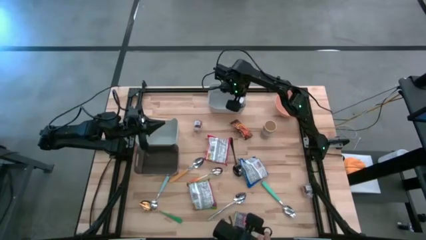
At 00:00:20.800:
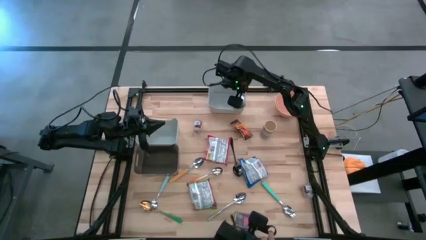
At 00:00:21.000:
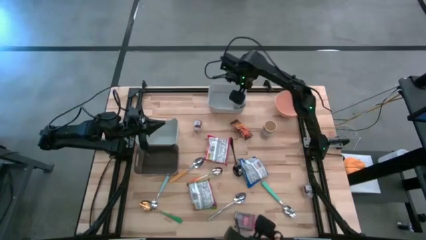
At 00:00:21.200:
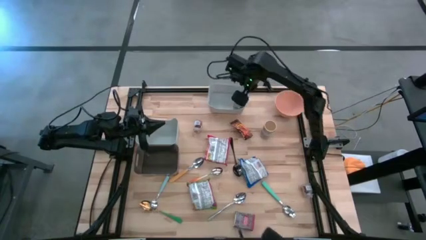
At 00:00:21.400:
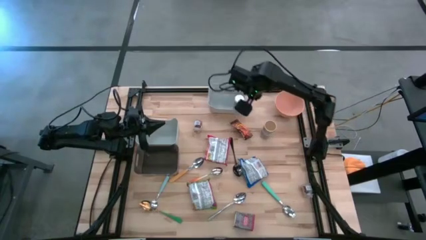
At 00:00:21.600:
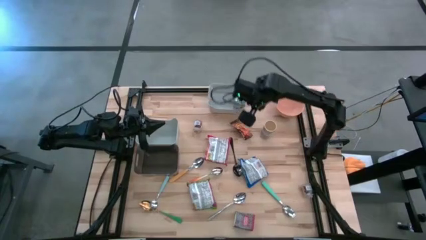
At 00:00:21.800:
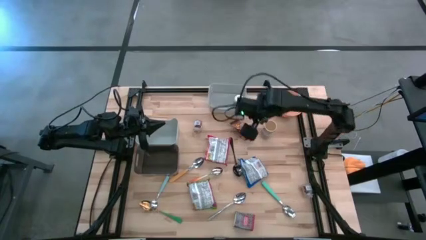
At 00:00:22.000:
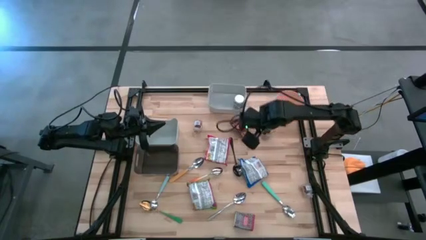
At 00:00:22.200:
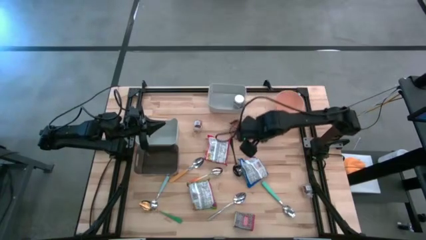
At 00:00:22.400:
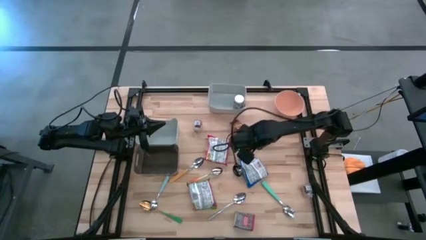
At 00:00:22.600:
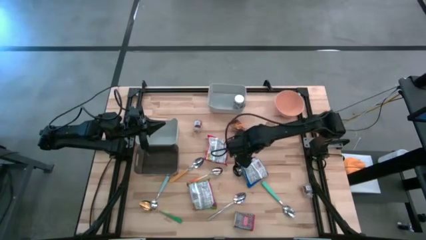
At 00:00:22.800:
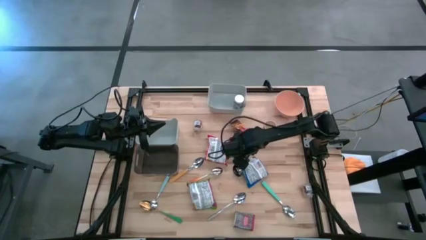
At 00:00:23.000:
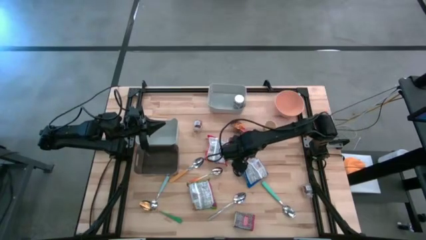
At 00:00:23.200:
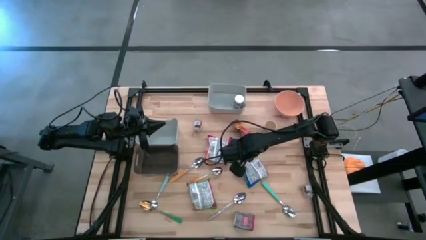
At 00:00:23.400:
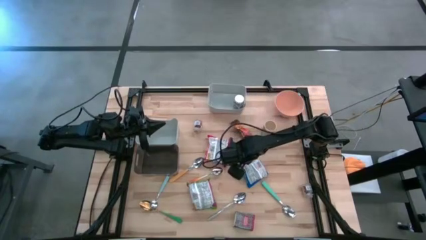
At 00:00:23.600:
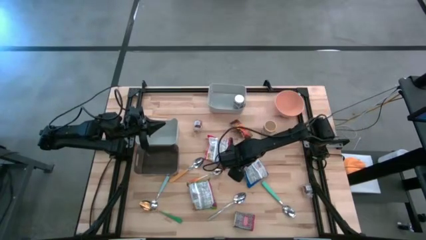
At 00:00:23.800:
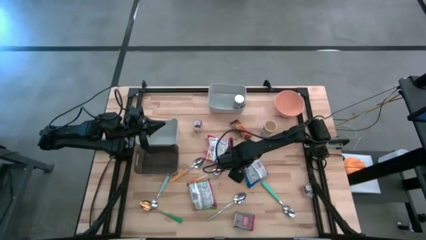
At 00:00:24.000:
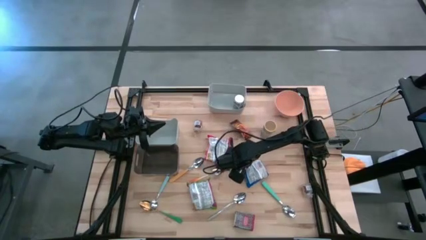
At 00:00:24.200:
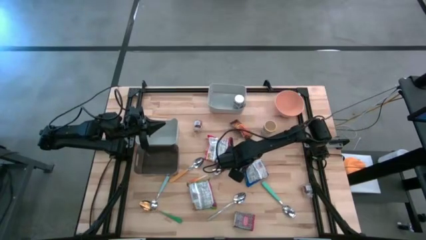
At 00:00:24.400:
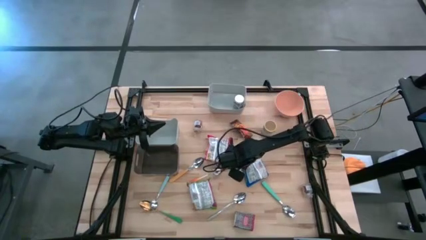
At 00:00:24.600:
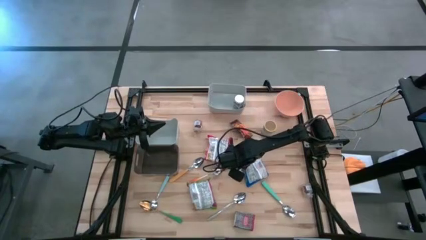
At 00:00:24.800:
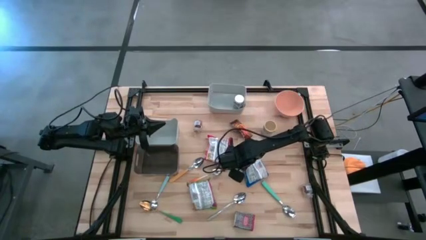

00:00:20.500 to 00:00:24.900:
Put the blue noodle pack into the bottom gray bin

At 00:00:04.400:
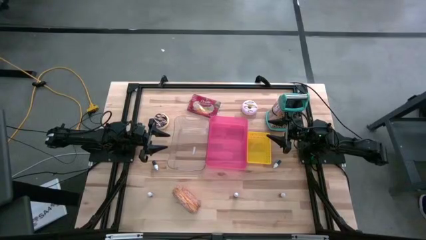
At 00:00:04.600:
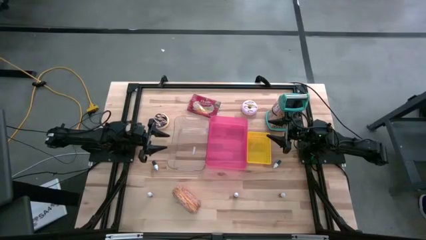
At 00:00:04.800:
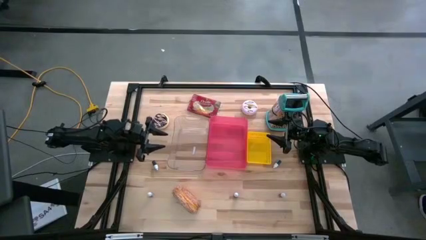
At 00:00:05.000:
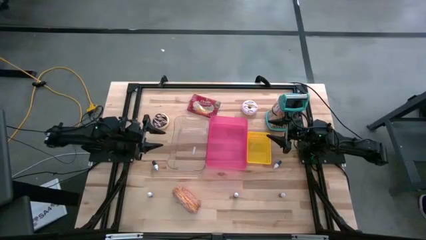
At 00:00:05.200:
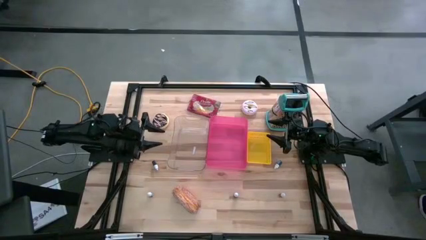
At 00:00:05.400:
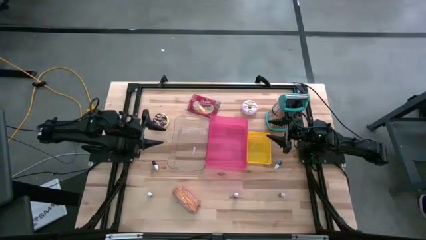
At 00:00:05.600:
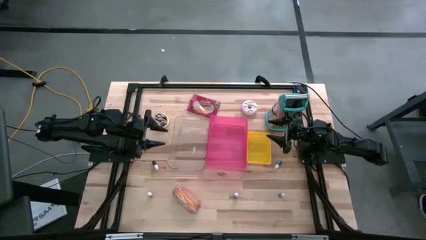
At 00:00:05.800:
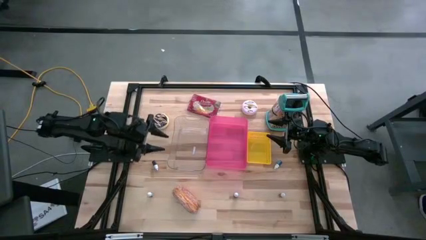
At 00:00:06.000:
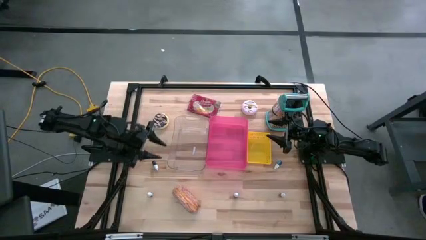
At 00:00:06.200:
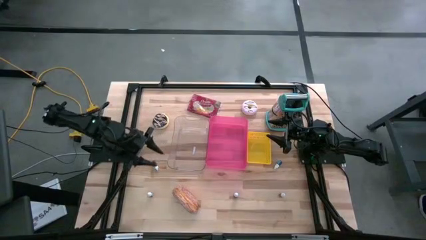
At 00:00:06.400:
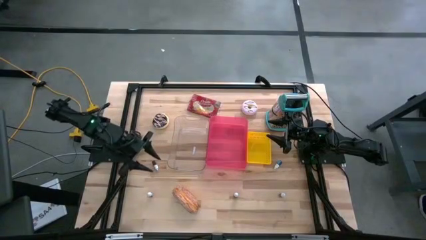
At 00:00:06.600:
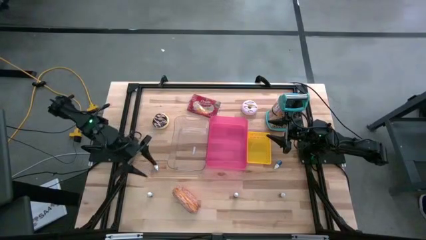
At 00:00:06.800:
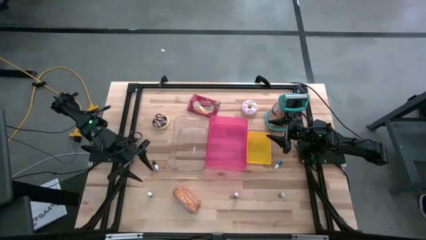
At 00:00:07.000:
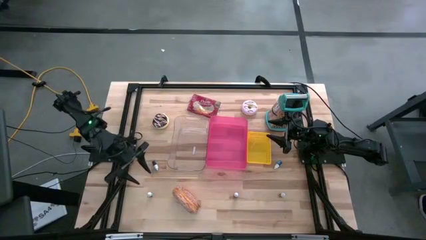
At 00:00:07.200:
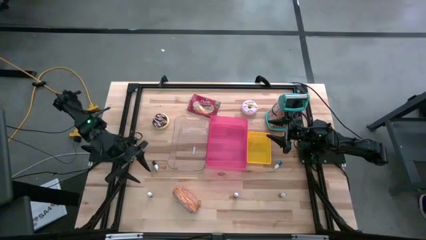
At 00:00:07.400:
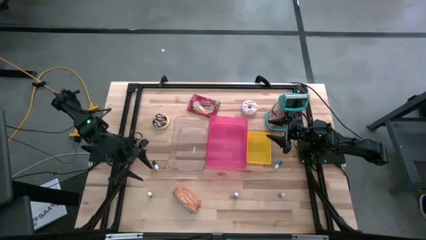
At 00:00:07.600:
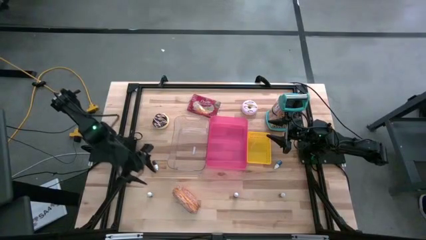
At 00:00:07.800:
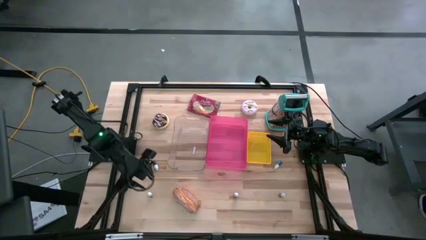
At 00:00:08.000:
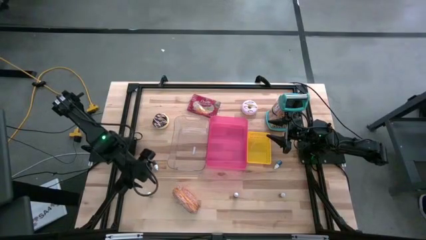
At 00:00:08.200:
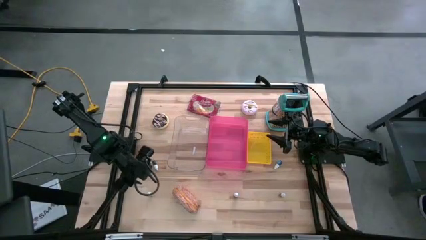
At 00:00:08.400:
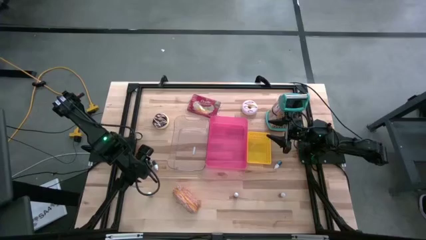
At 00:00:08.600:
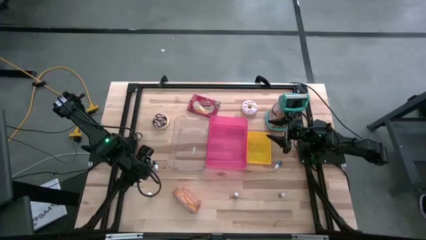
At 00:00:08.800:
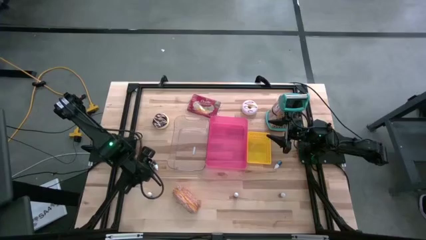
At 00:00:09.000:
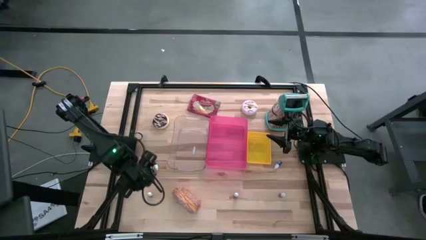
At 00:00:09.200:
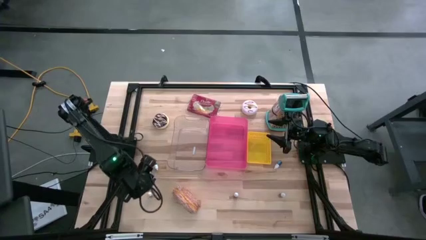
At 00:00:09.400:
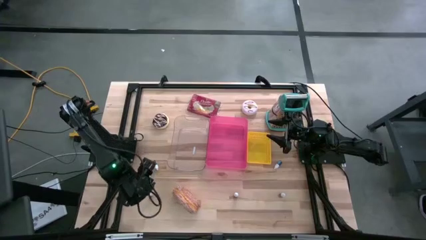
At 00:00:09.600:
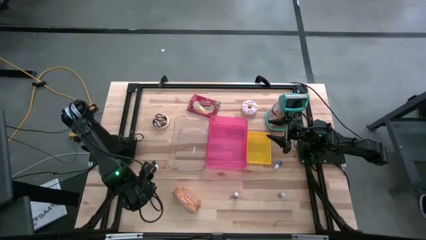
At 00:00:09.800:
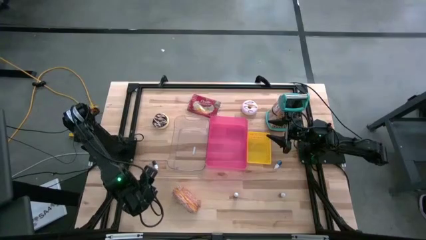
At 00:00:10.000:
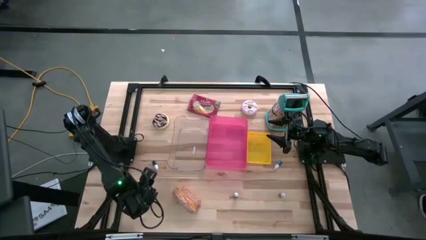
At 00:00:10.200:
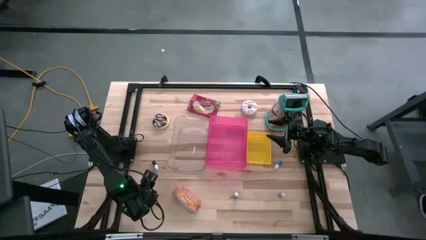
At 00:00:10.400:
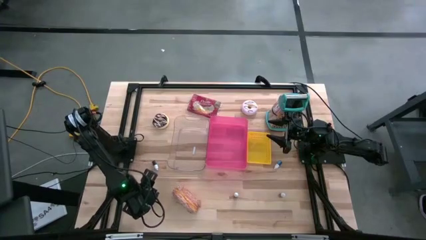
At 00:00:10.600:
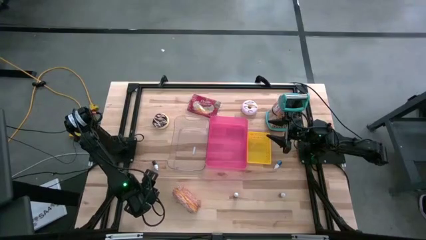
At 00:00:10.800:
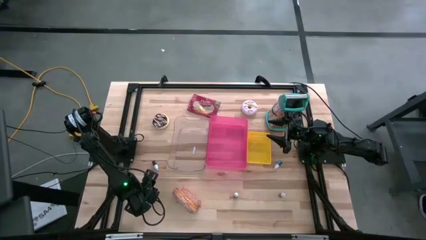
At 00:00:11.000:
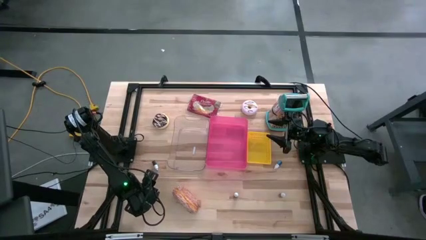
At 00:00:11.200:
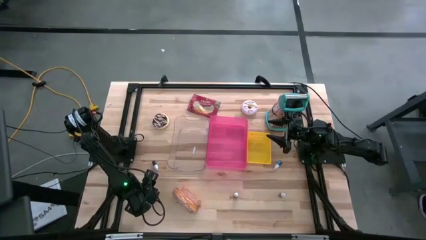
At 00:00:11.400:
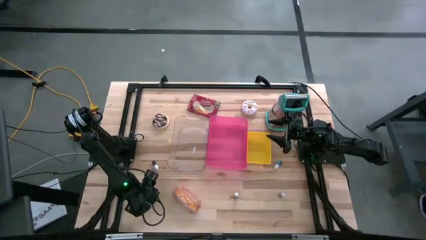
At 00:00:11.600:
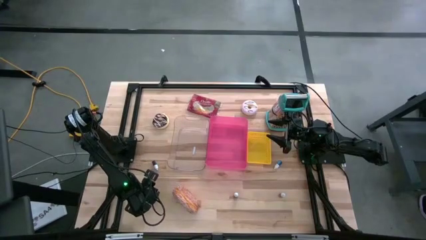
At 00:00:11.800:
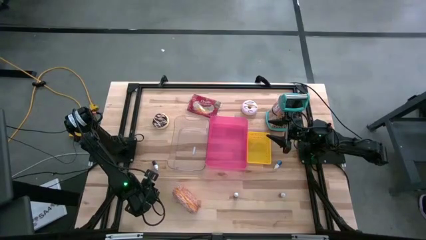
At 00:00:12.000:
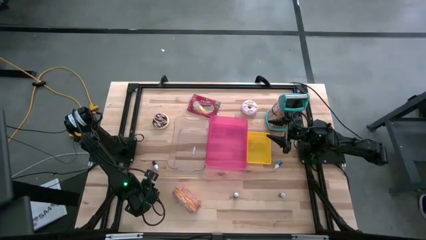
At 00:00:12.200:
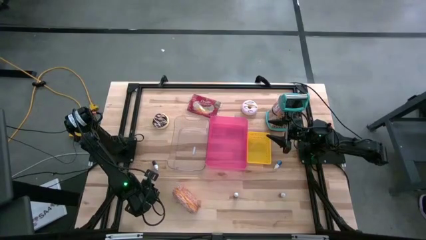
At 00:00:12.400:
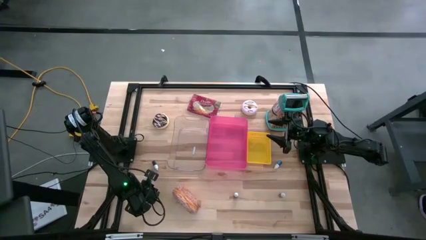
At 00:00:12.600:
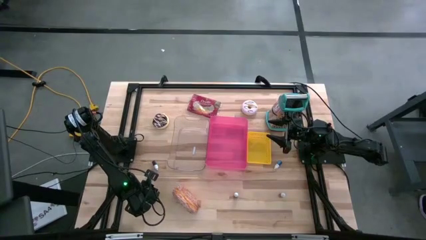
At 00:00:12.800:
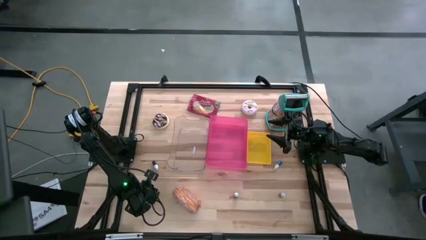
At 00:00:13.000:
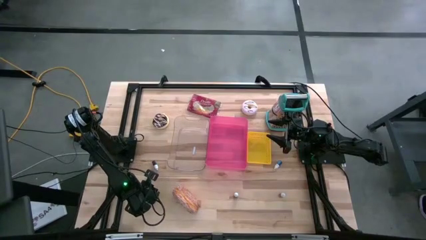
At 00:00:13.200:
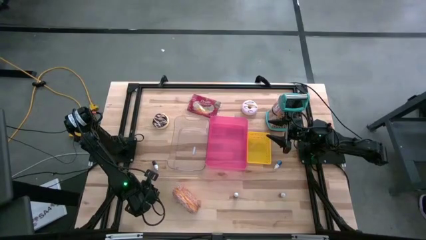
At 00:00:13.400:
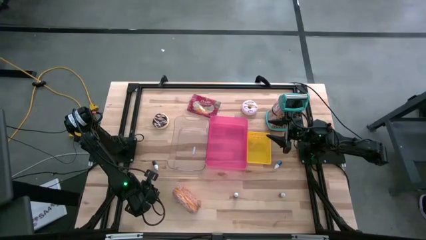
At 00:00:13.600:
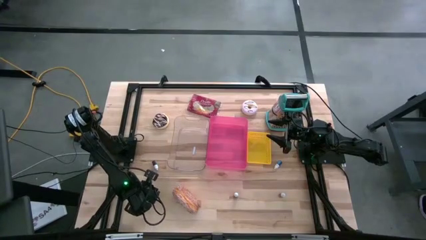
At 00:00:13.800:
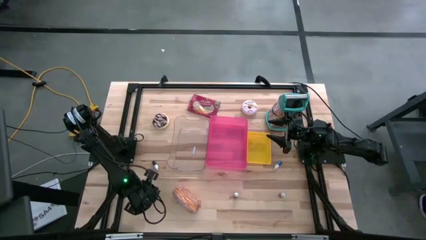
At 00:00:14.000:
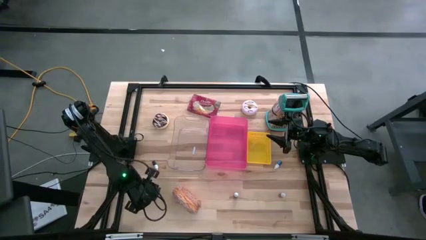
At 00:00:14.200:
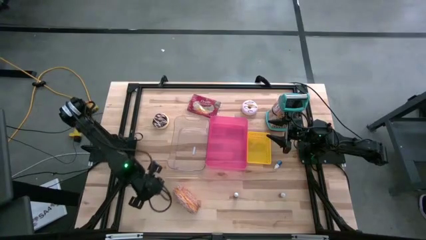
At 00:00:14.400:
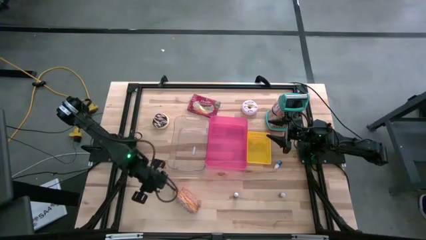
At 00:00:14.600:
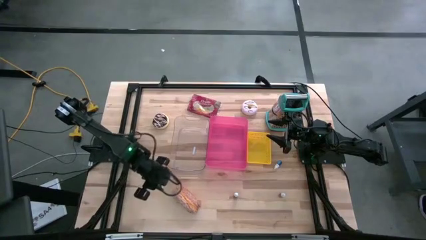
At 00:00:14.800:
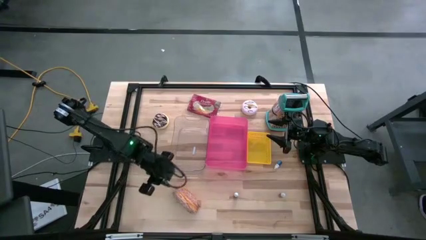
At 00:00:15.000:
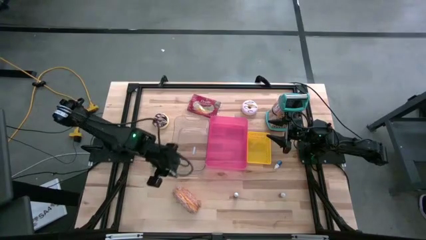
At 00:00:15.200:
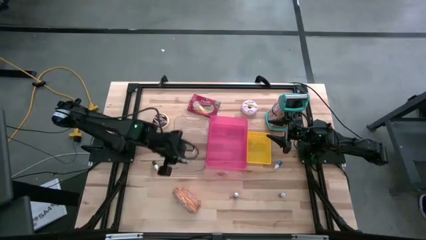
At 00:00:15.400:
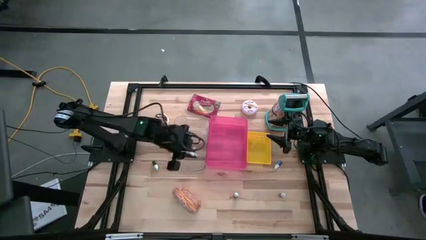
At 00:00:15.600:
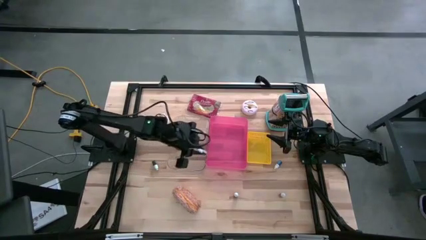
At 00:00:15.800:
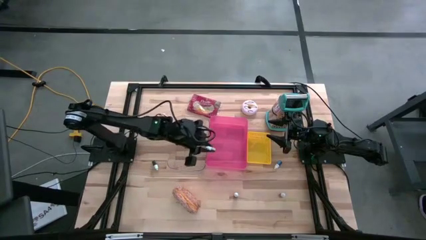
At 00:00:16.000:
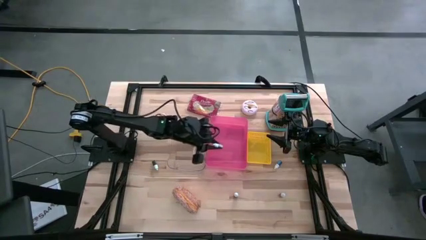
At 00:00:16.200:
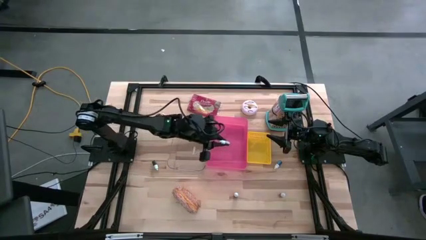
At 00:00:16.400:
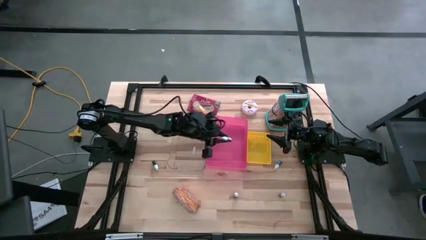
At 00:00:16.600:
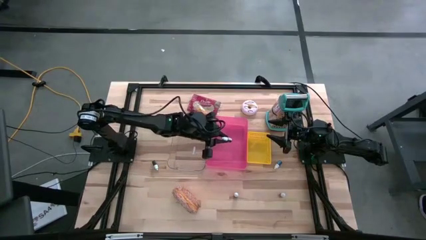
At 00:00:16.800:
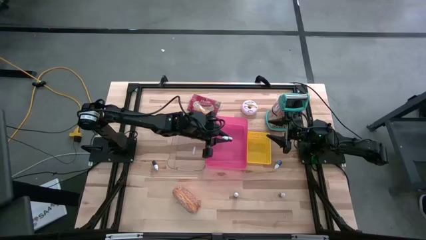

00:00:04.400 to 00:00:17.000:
Put the bottom black food coloring bottle into the yellow bin
